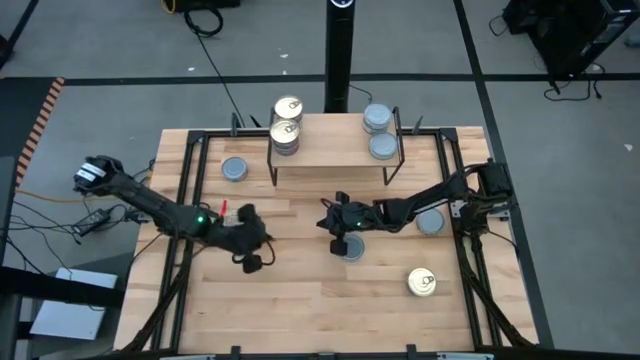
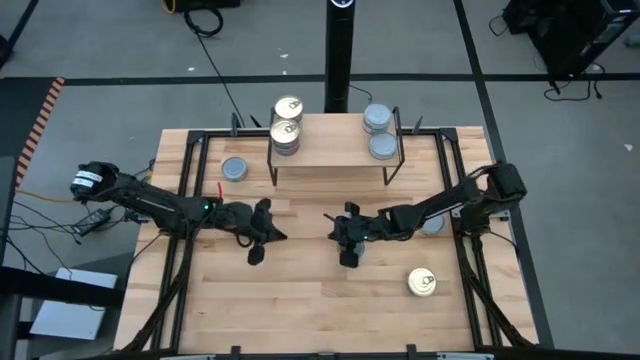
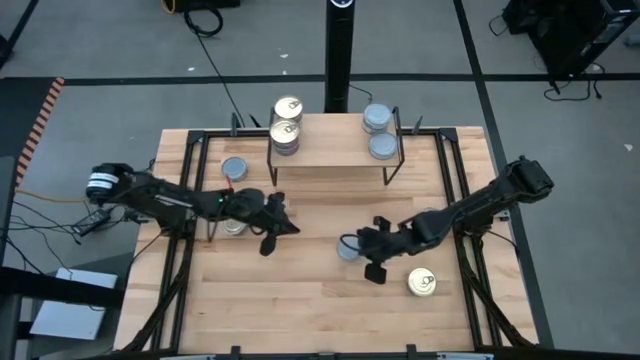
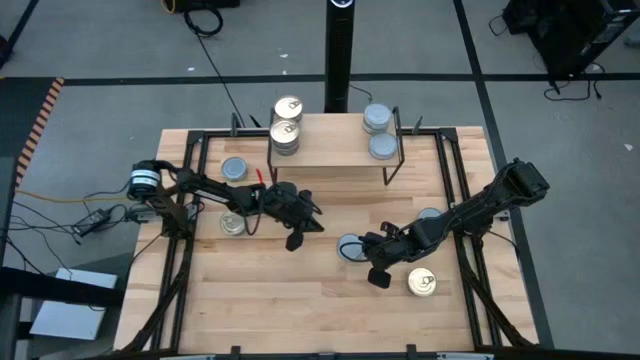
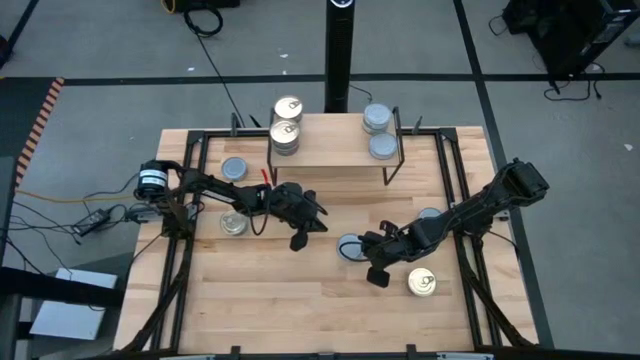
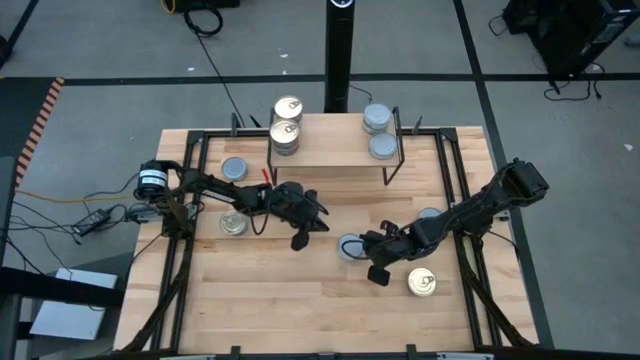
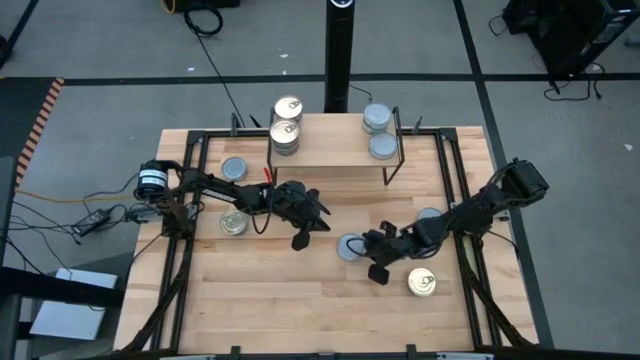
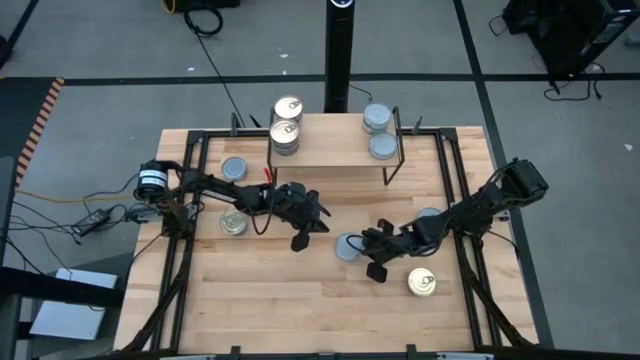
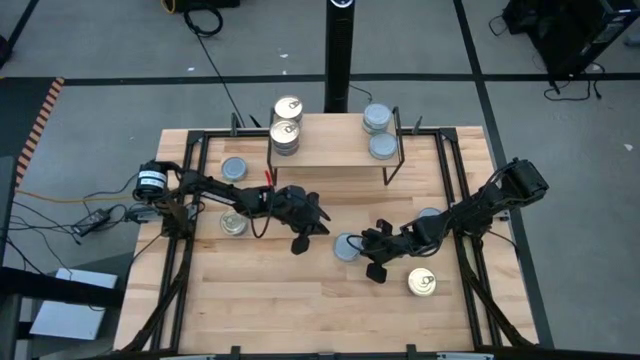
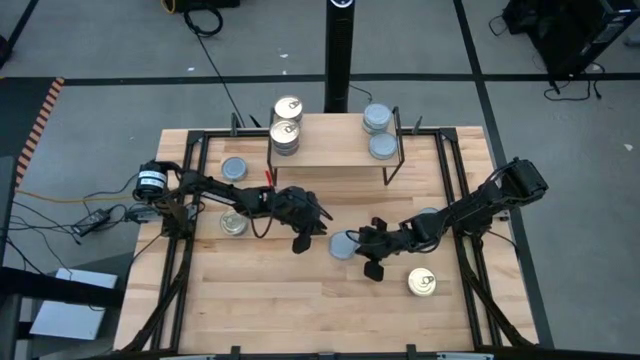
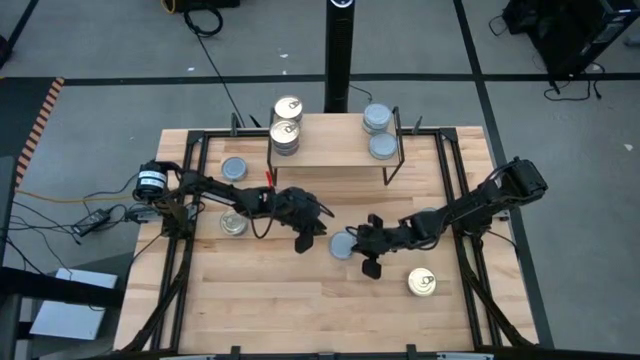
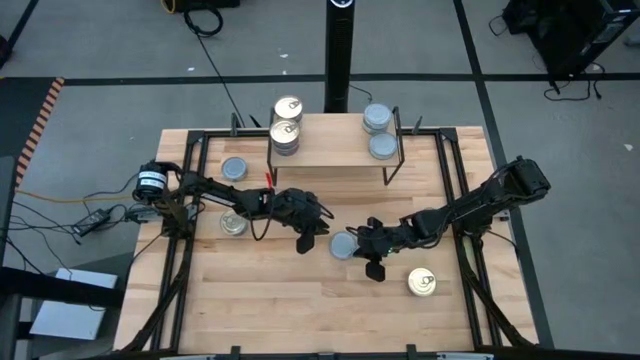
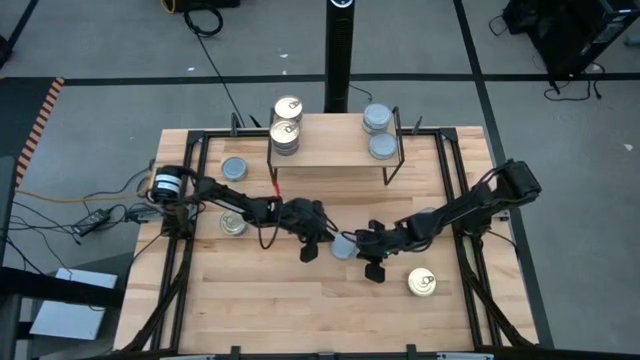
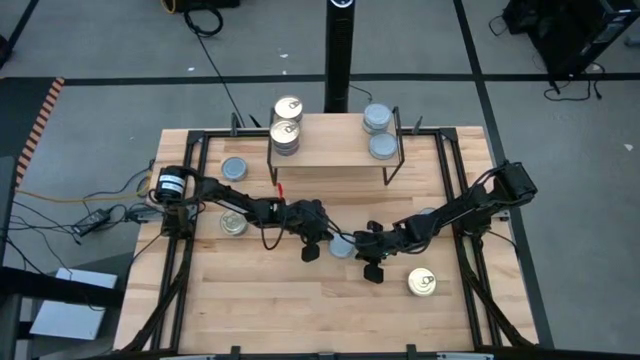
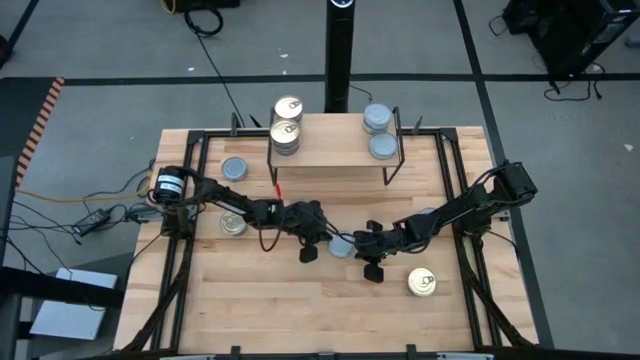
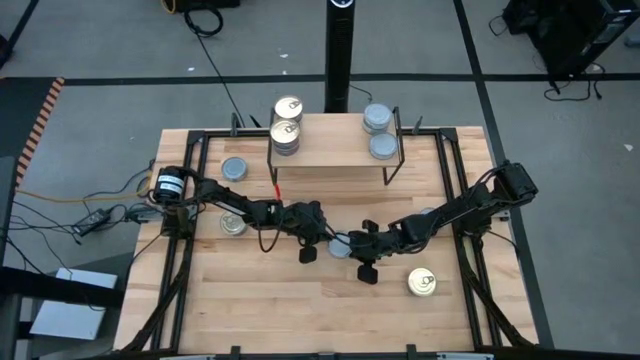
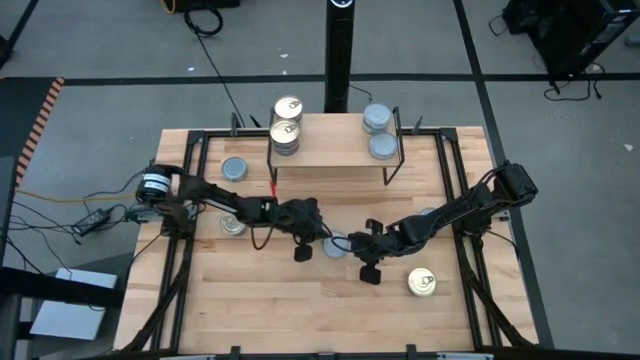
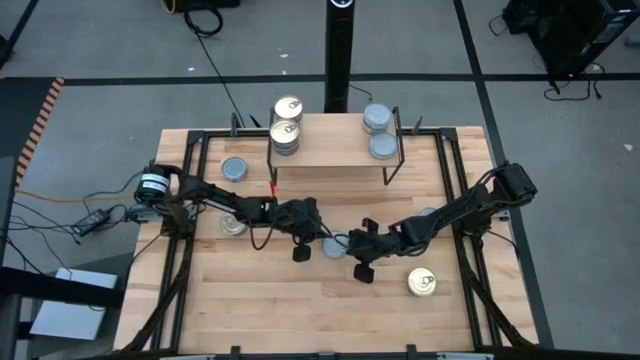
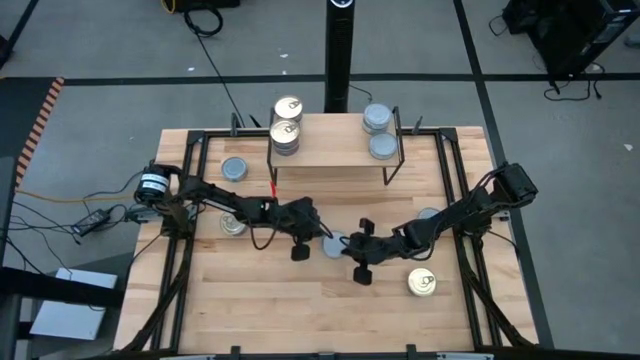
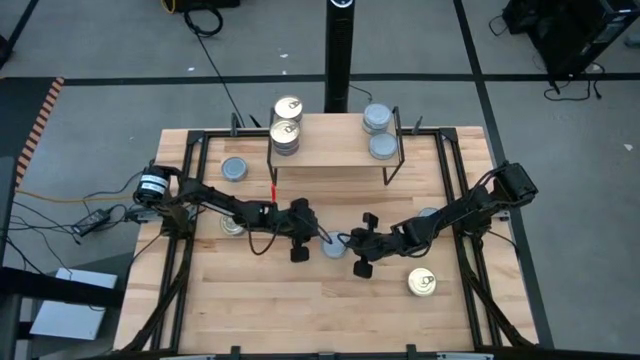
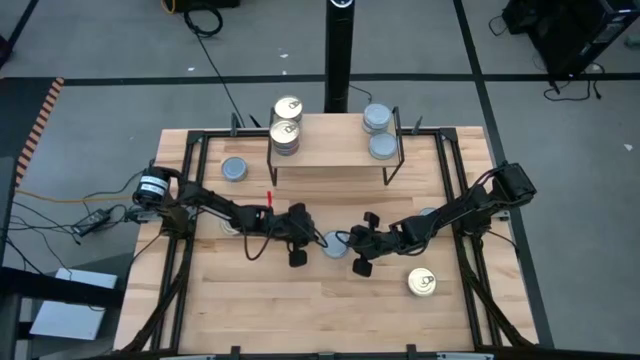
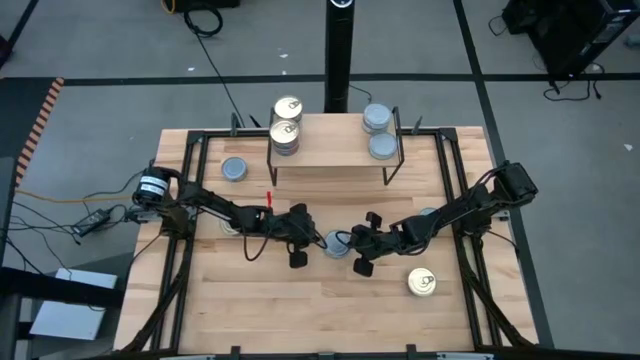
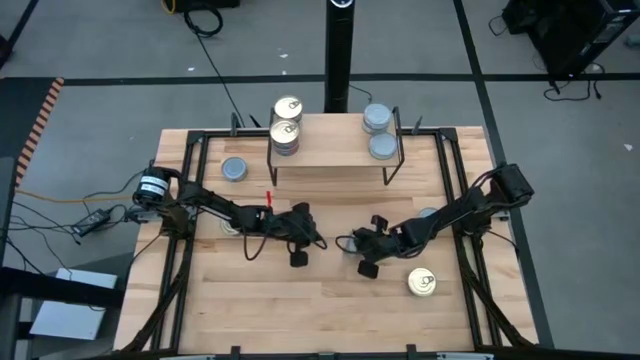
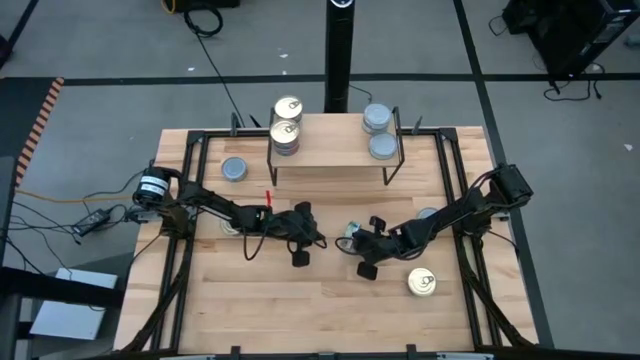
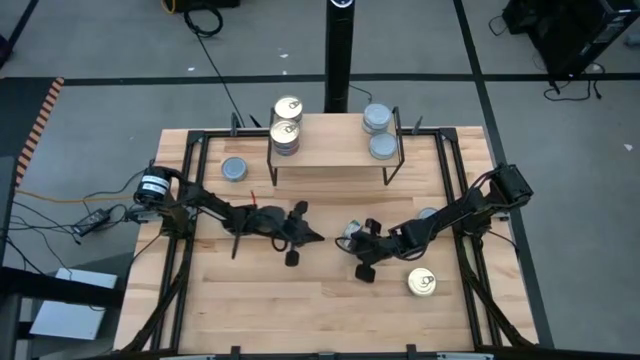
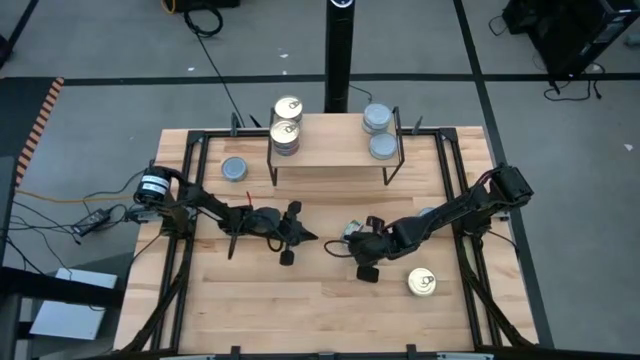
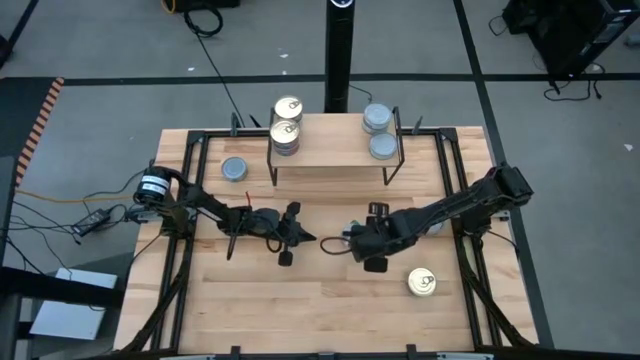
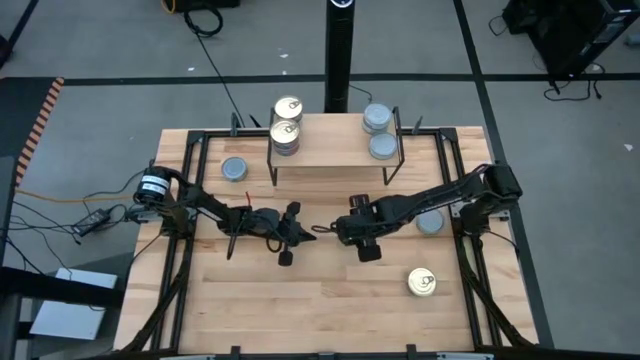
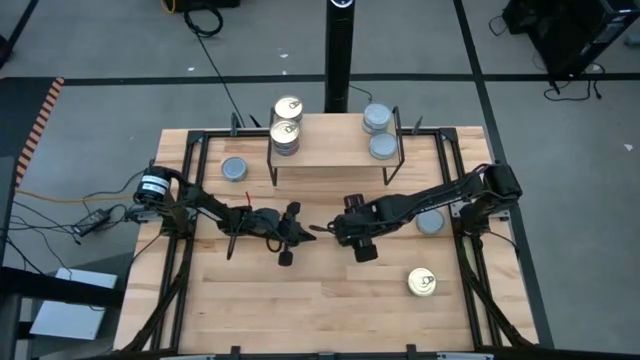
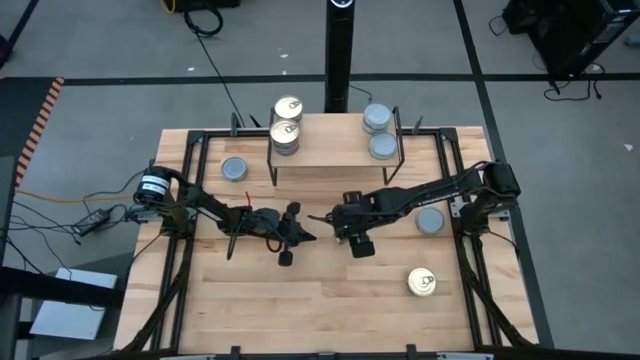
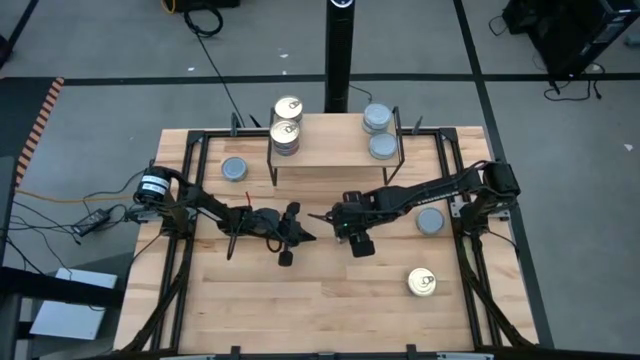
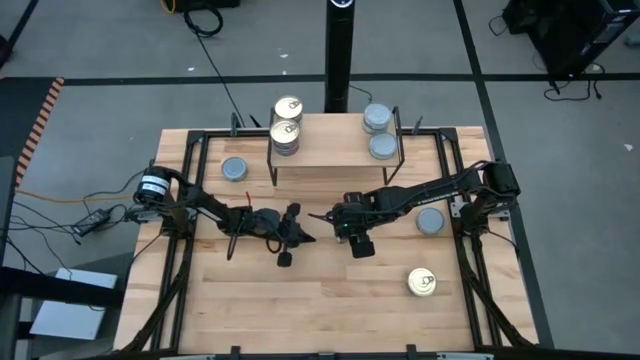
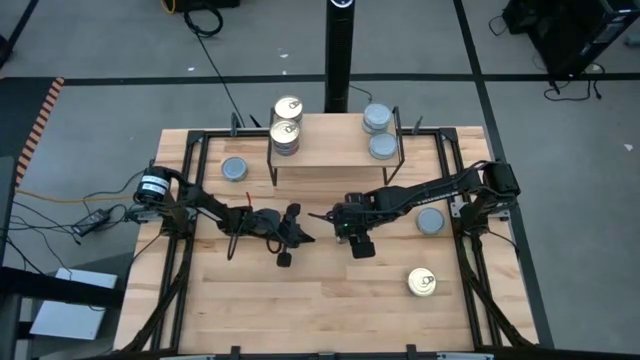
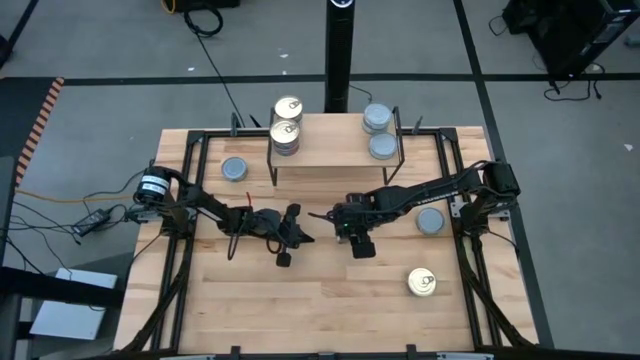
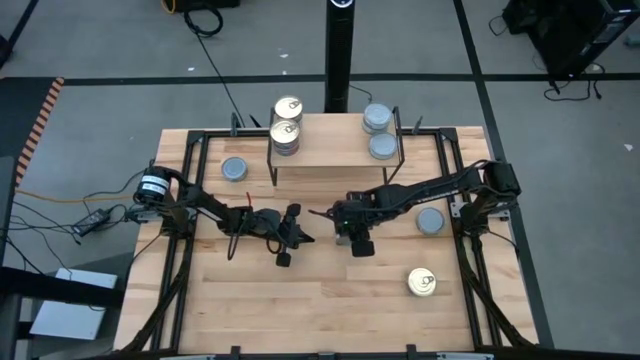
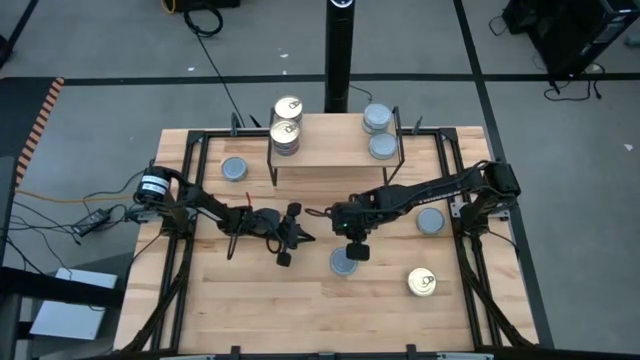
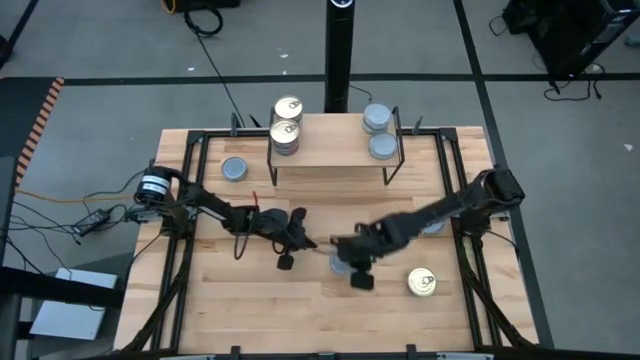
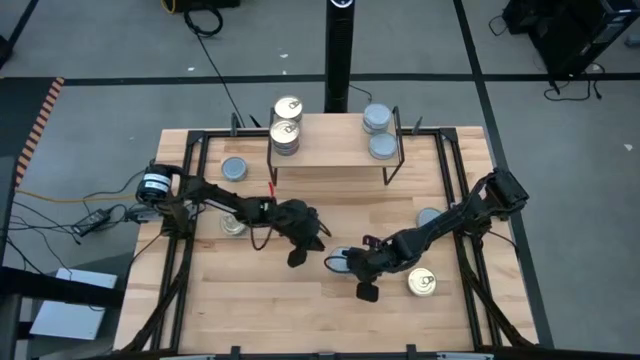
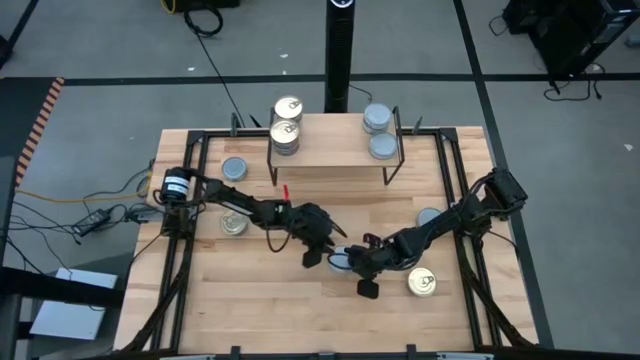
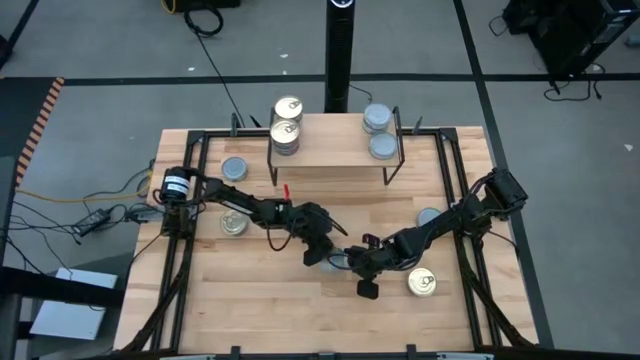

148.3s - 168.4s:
Task: Stack canned seafood by type on shelf
Stack the green tuna can on the bottom green tuna can on the shelf

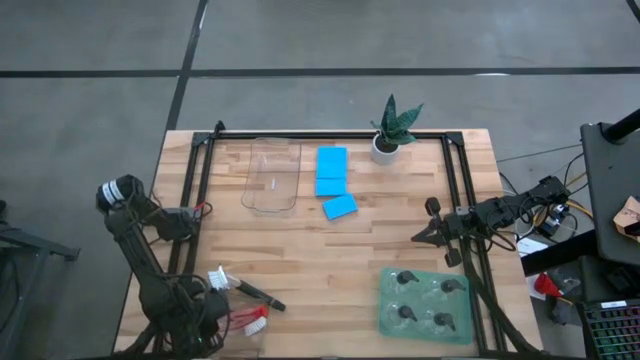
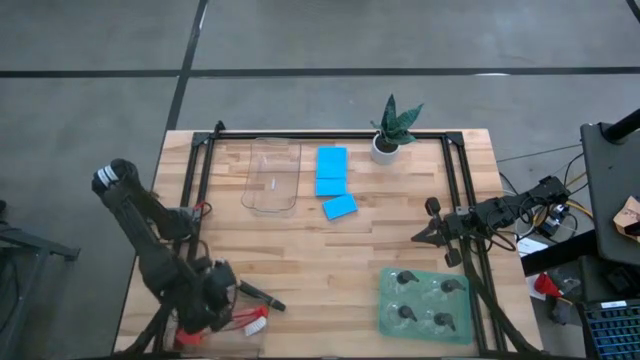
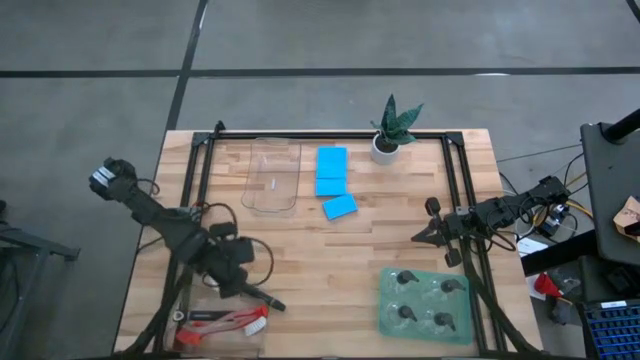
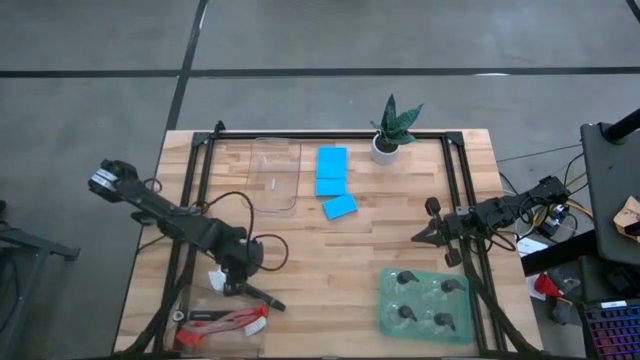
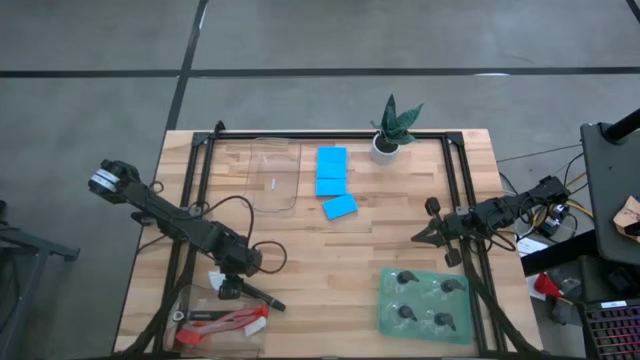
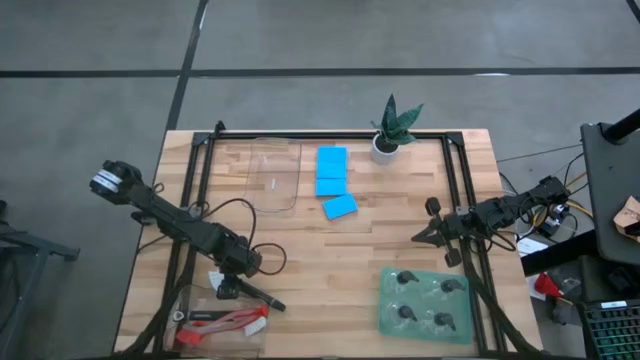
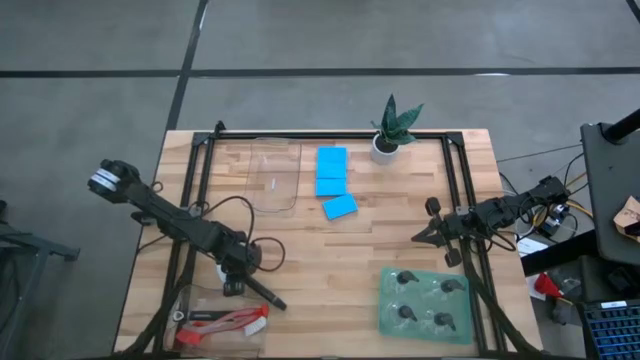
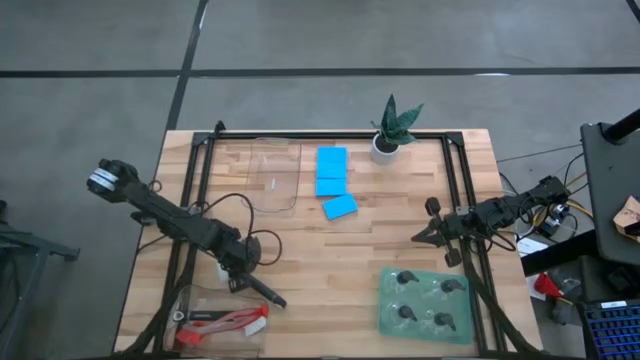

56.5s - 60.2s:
Task: Pick & Place Kitchen Sink Supplies
Put the black dish brush into the bottom transparent bin
